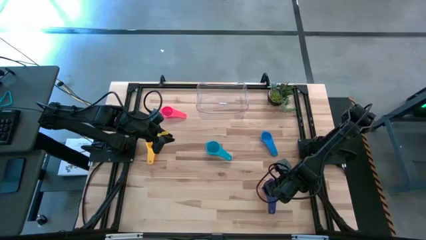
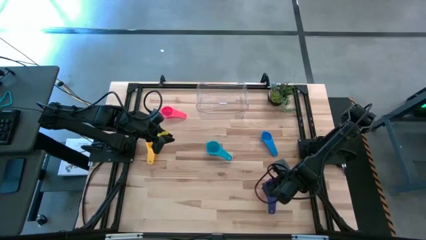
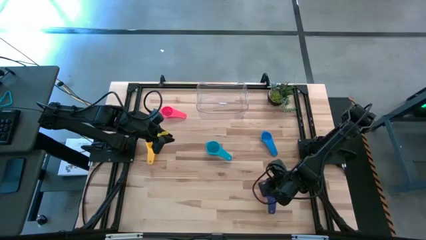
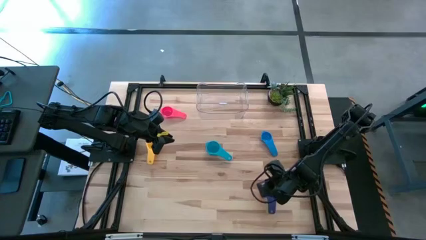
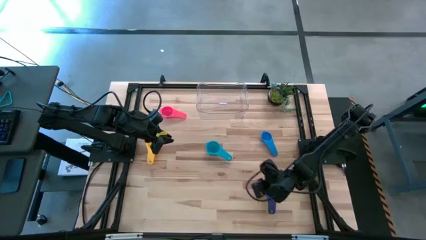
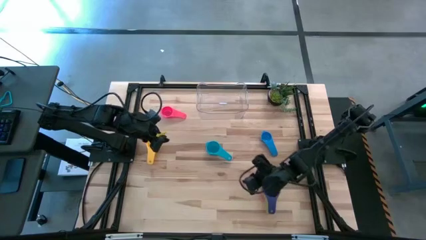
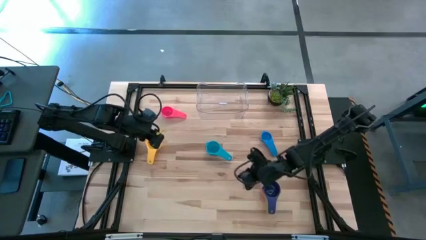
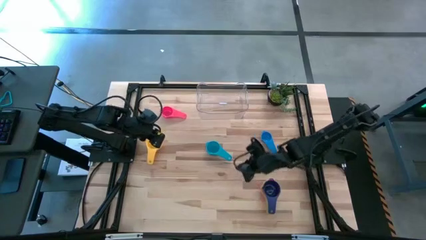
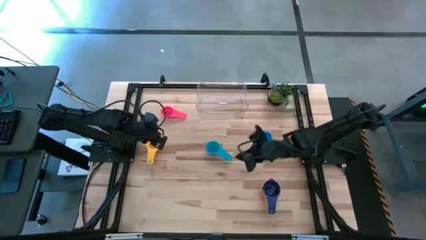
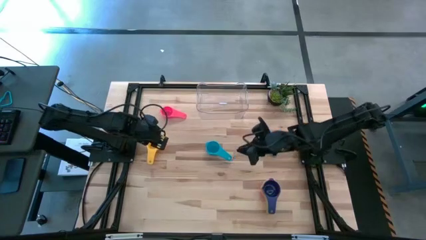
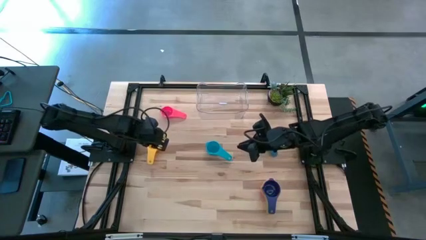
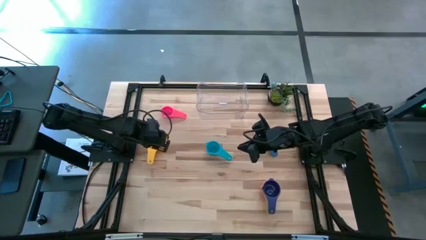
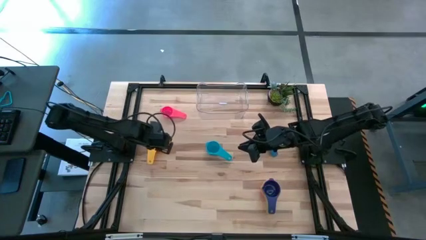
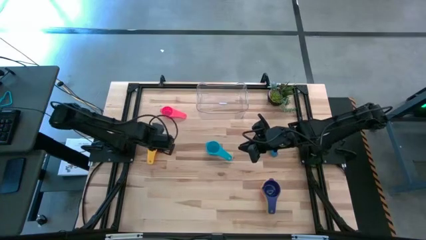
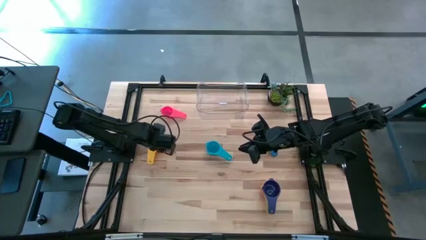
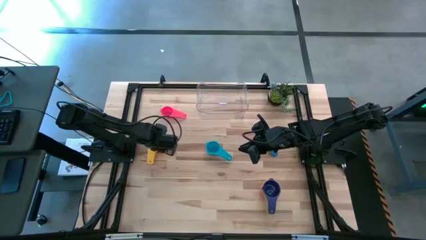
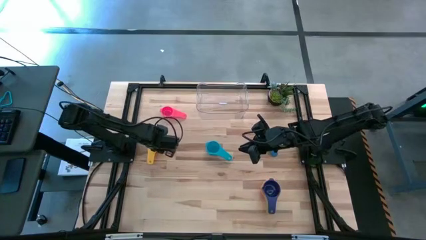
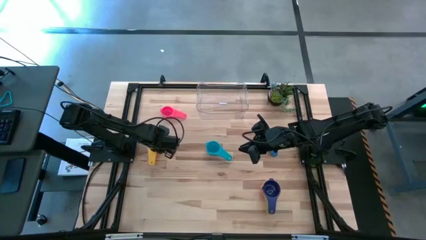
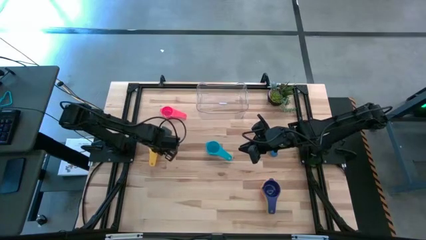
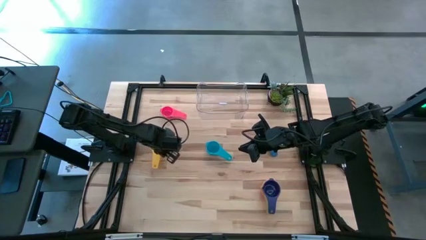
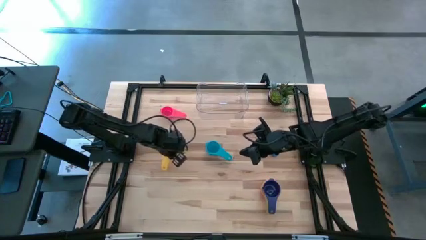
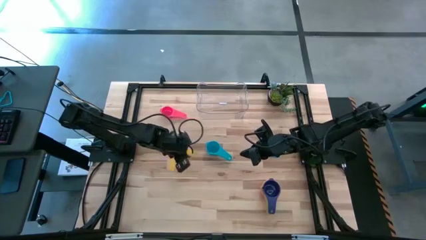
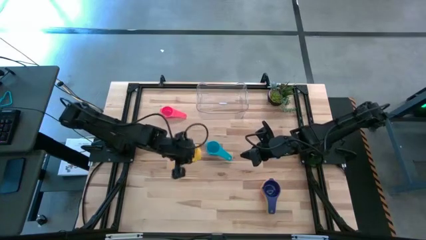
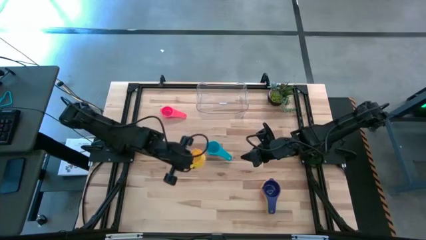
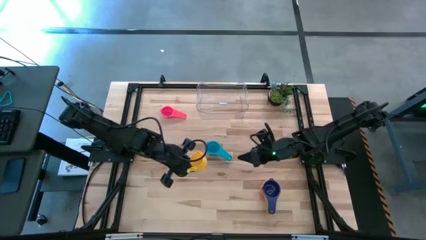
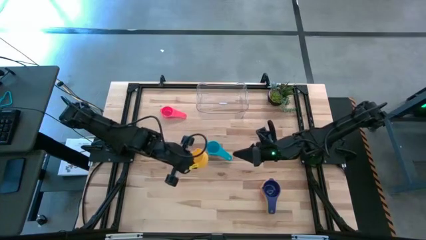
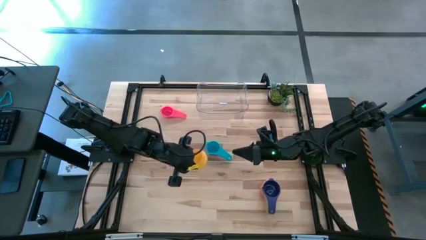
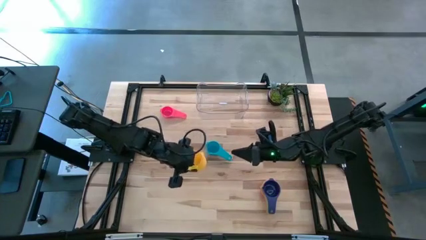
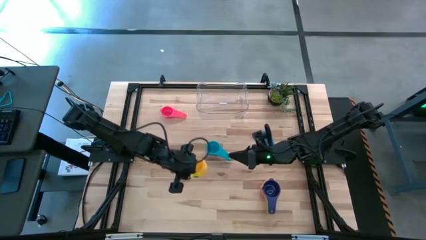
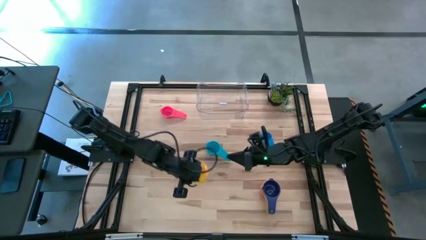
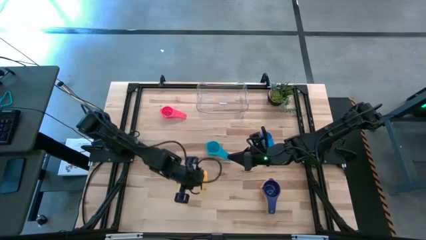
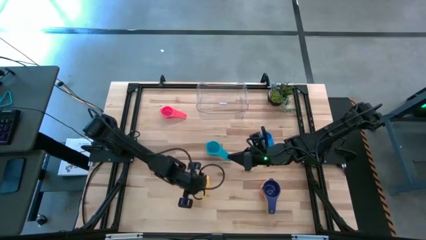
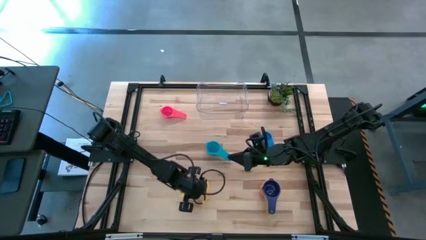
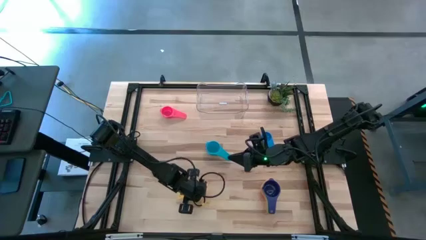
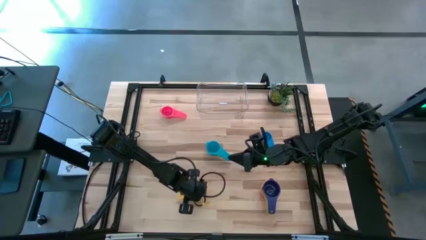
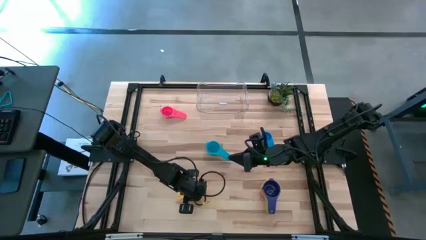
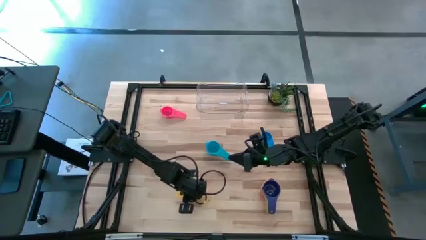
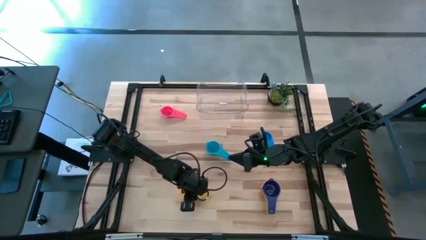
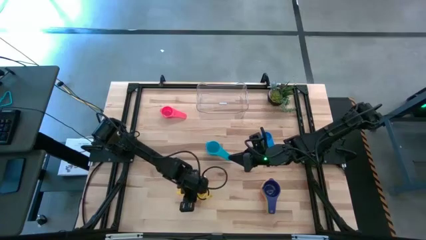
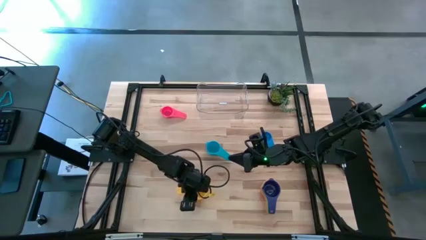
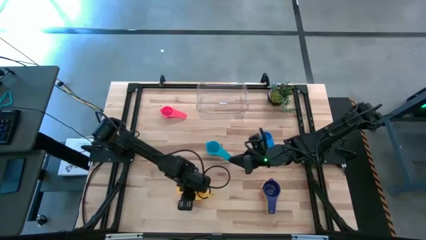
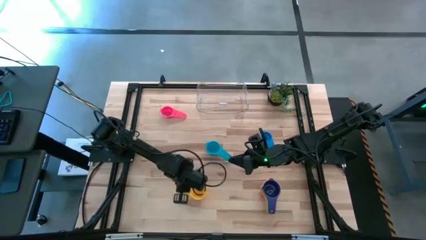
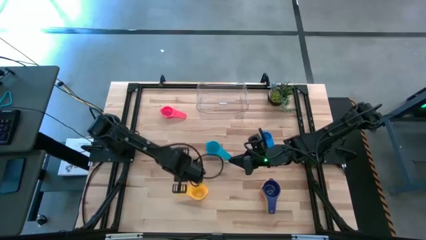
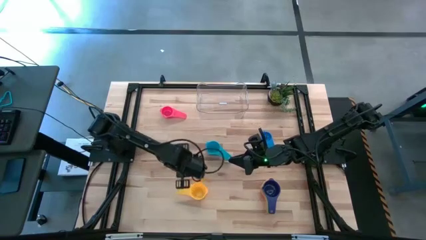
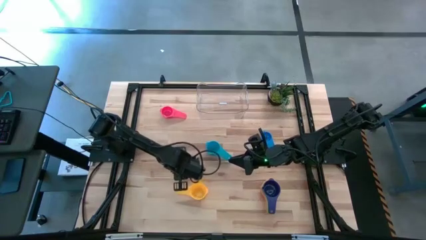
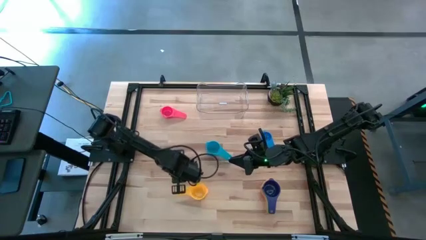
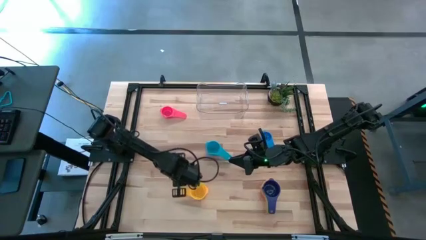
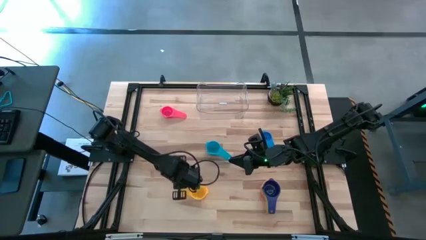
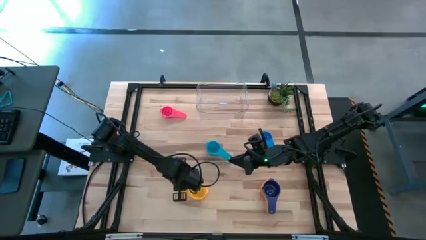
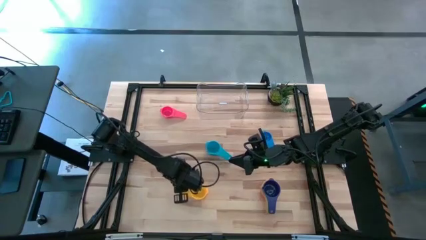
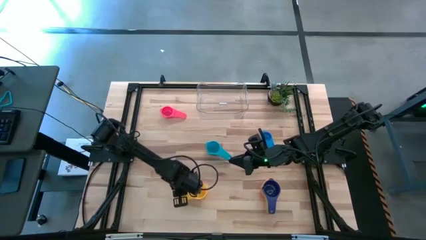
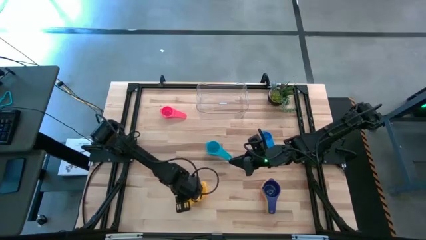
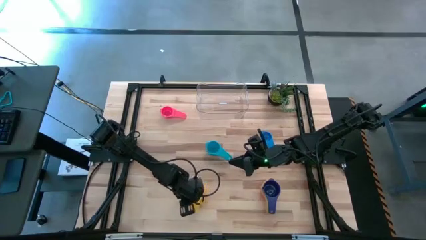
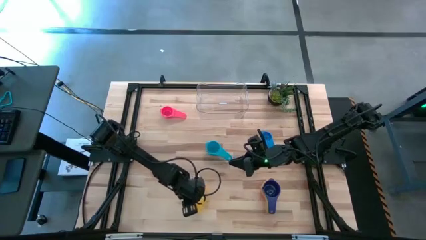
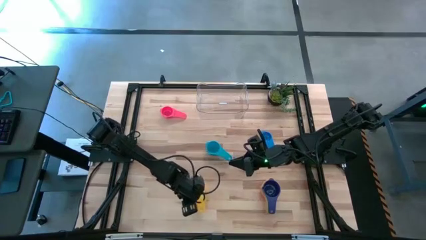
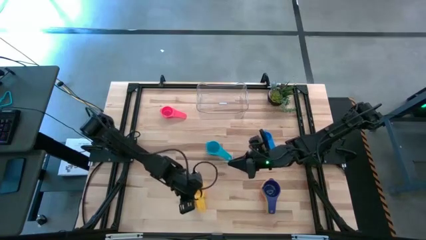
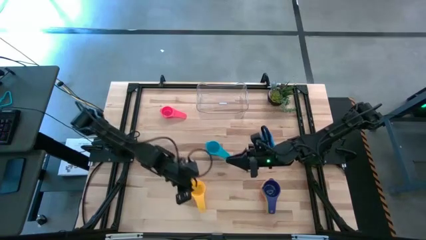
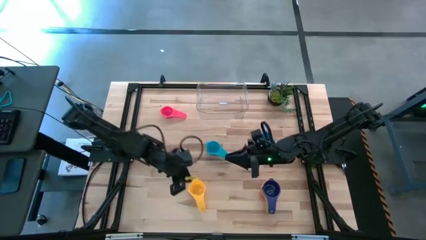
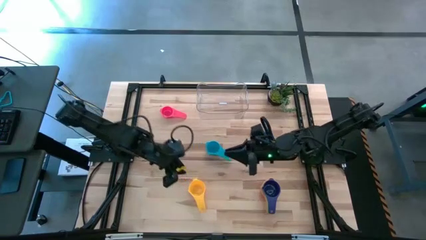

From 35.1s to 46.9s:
Task: Nest measuring cups in basket
Stack the yellow measuring cup on top of the dark blue measuring cup

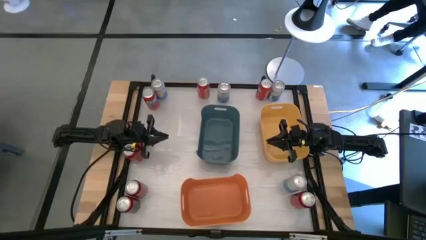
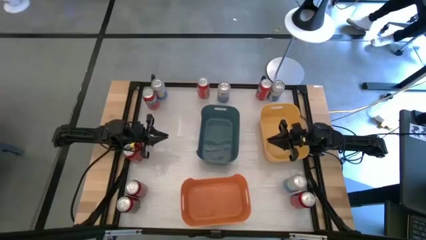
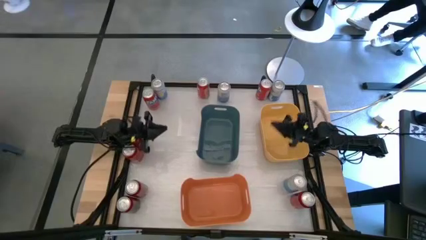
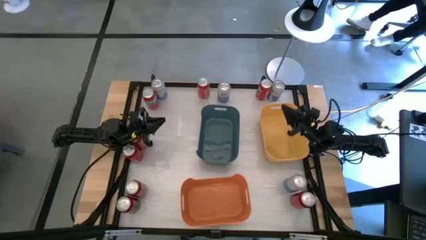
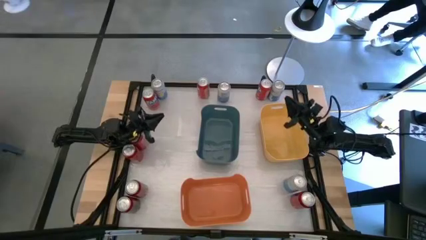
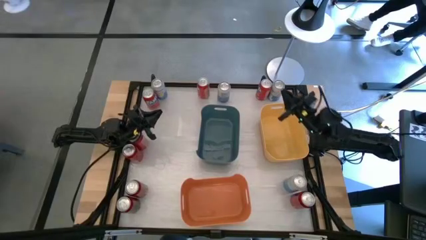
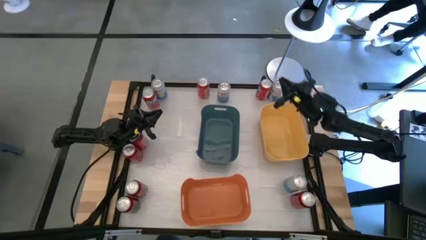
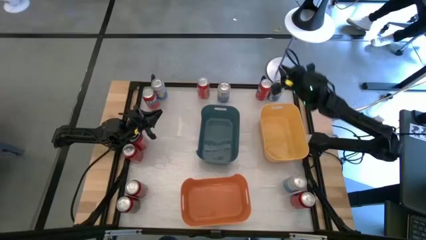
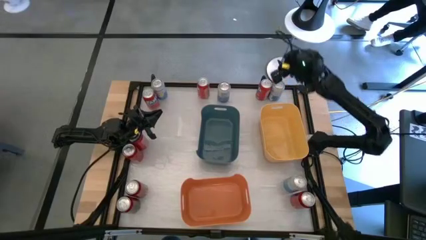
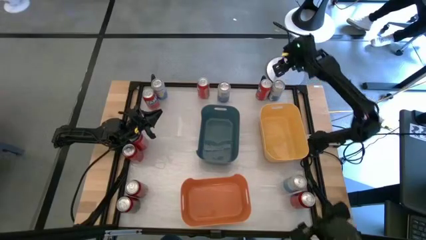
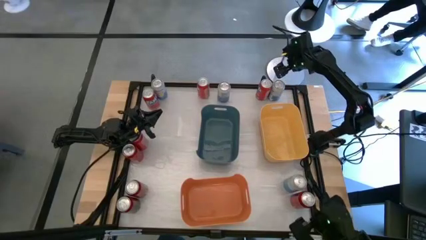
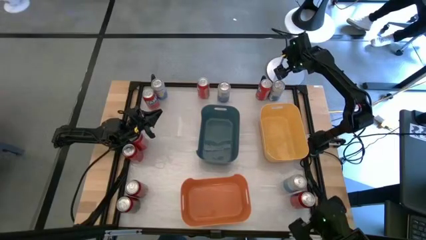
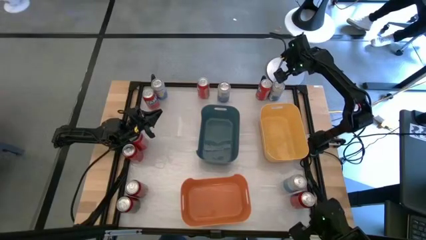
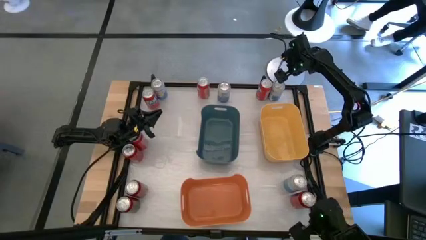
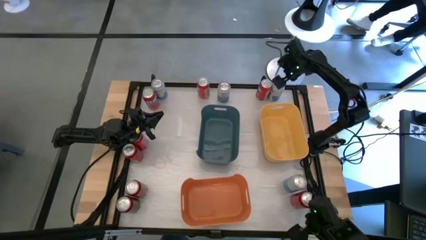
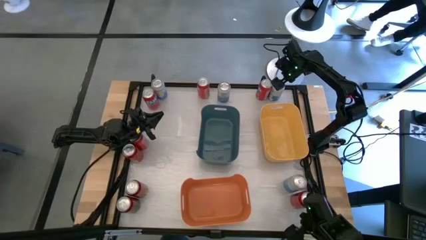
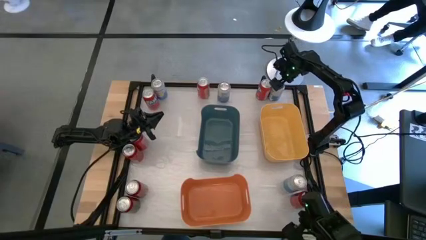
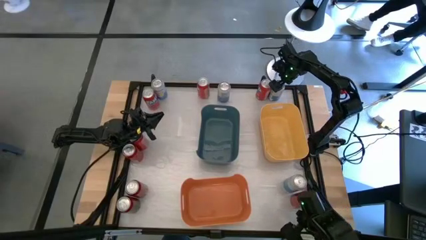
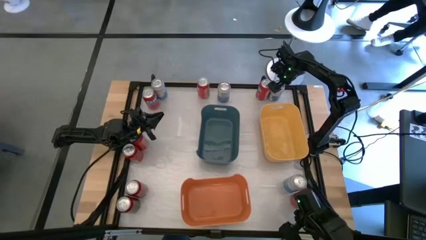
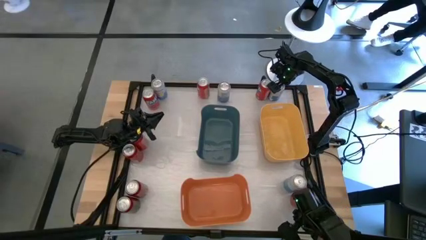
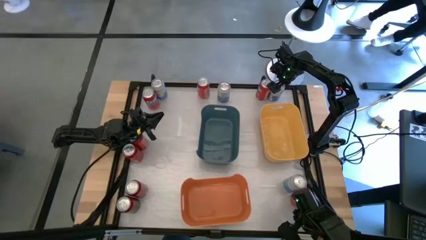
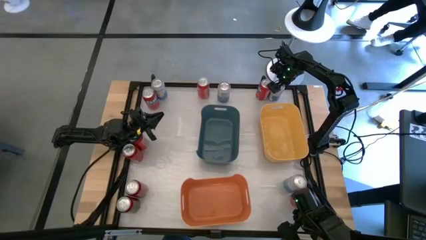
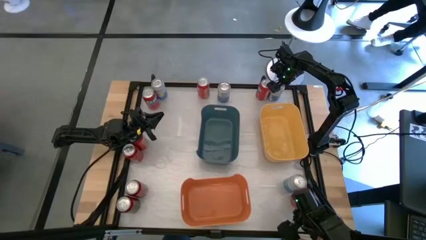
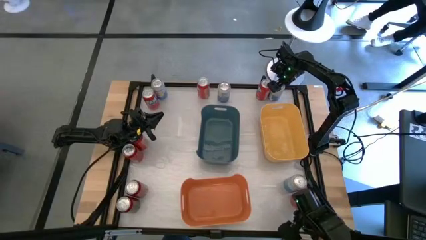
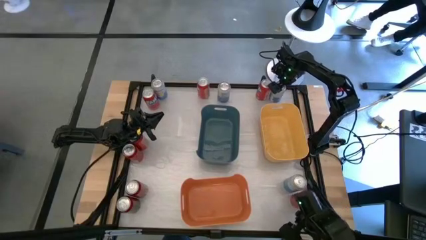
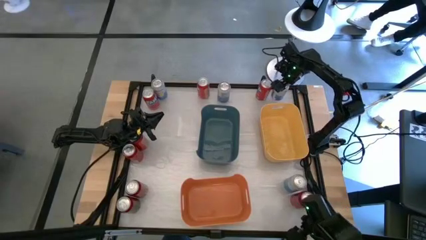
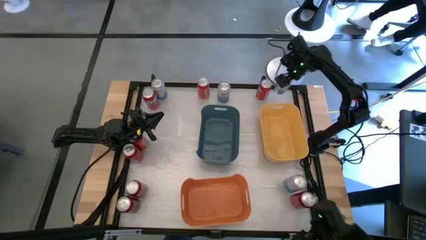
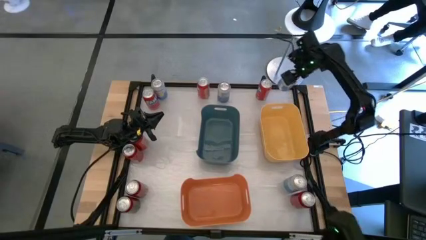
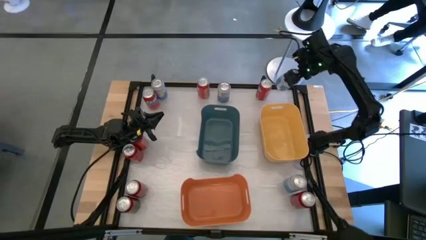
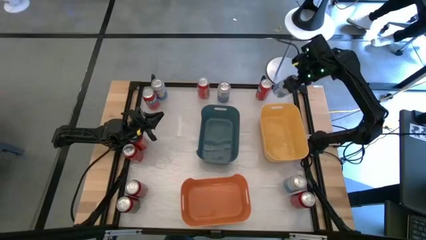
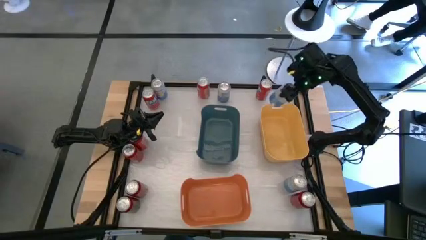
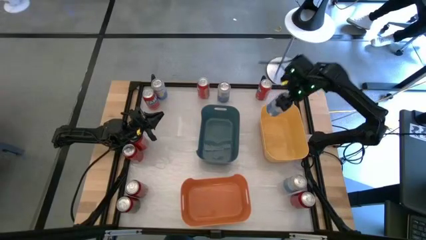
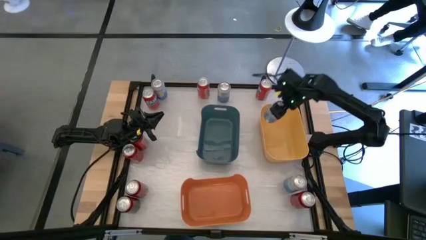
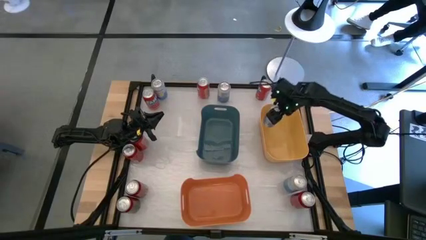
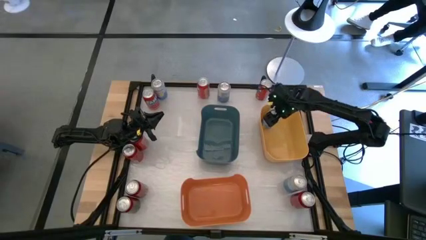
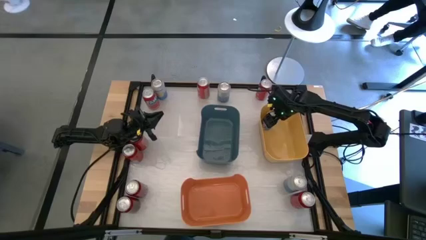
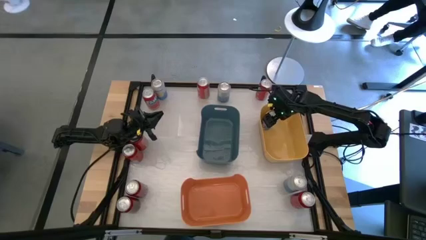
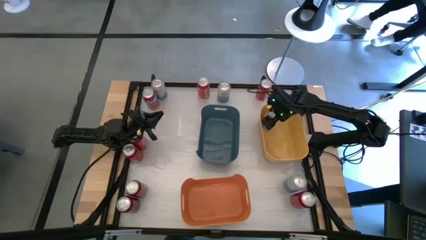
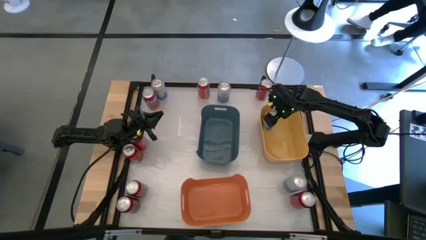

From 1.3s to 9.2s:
Task: Sort soda cans
Put the top right white soda can into the yellow bin
